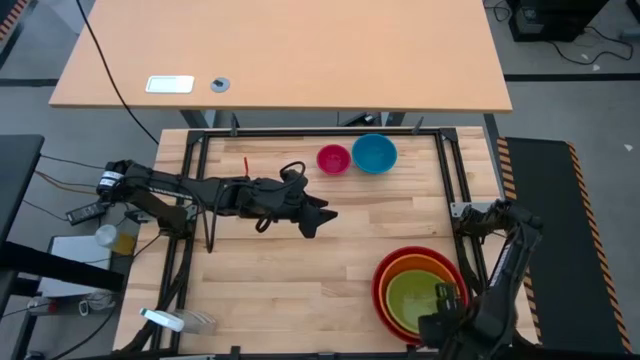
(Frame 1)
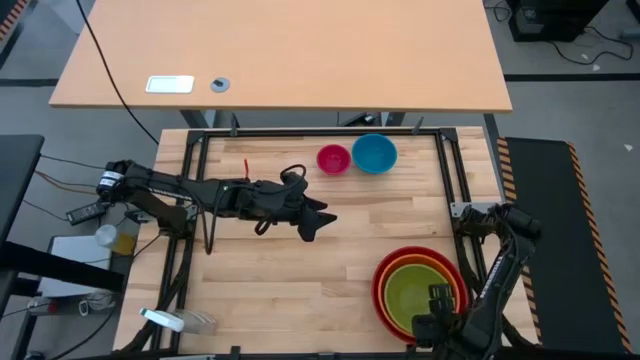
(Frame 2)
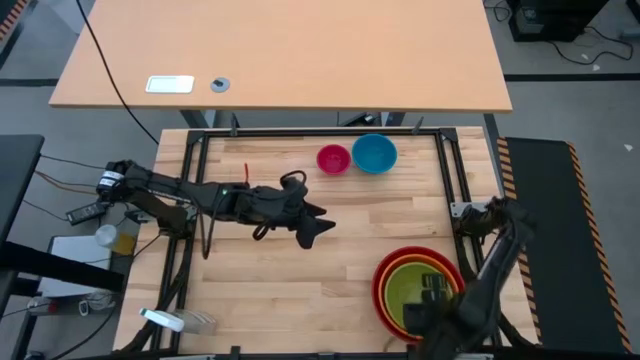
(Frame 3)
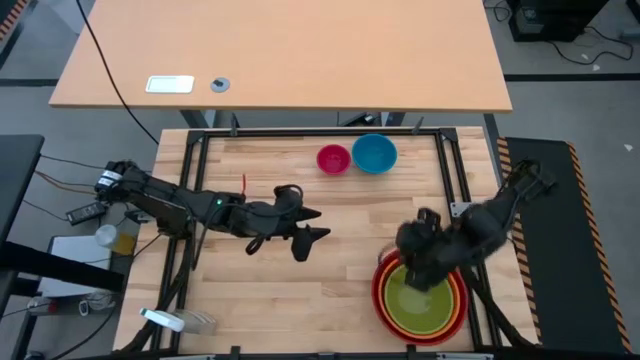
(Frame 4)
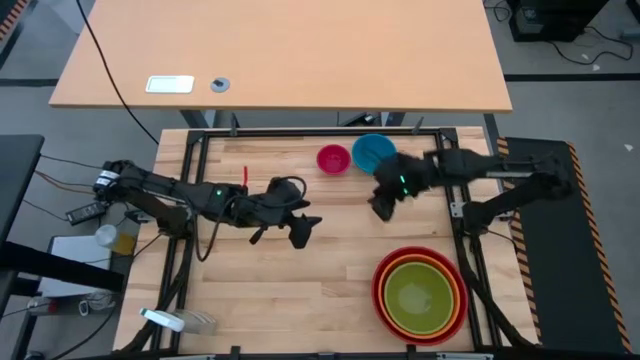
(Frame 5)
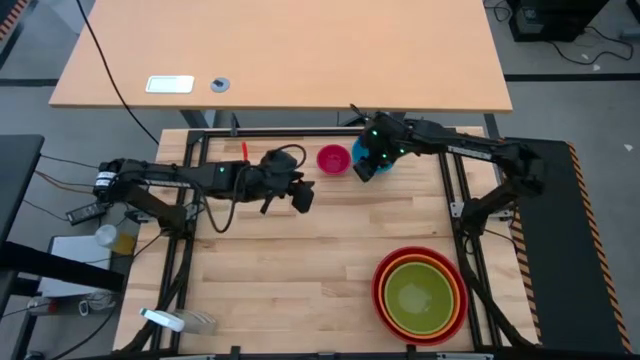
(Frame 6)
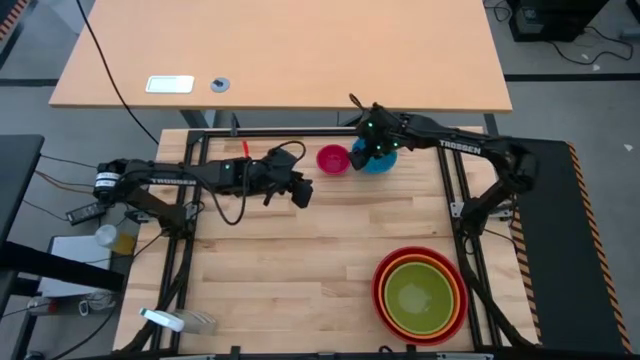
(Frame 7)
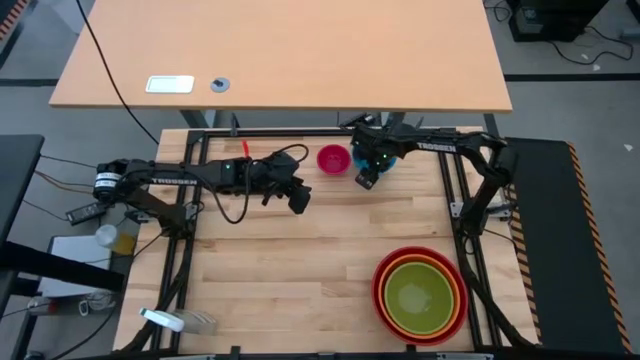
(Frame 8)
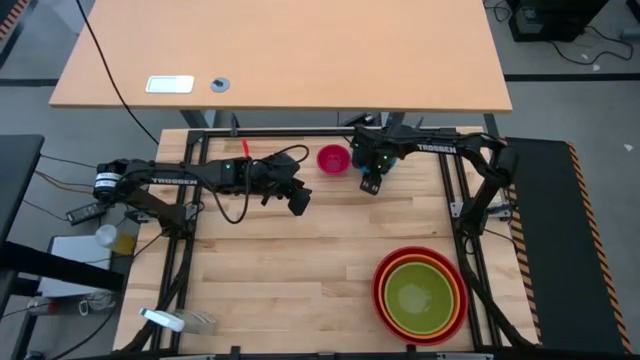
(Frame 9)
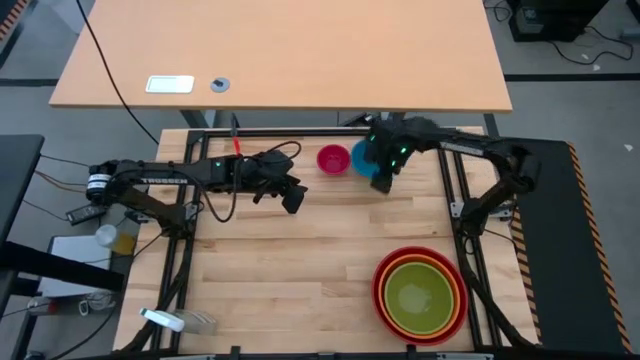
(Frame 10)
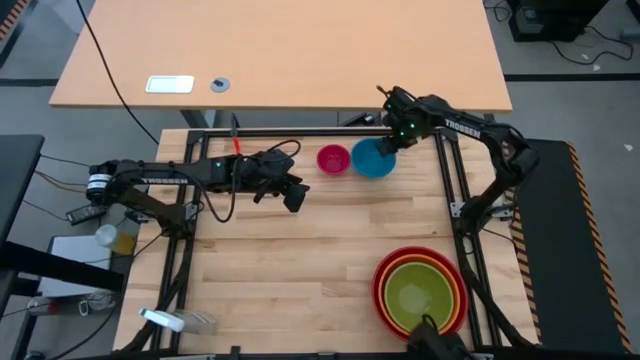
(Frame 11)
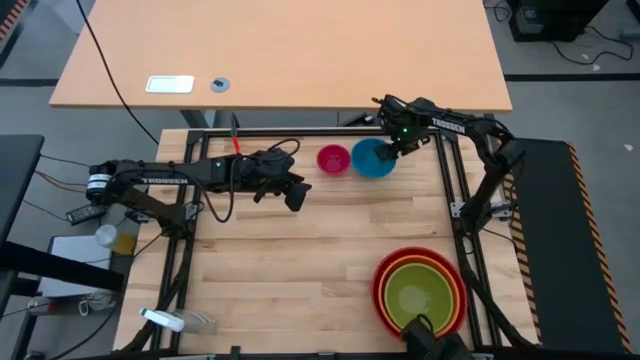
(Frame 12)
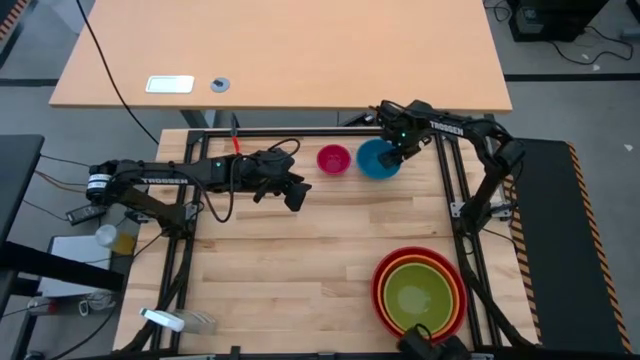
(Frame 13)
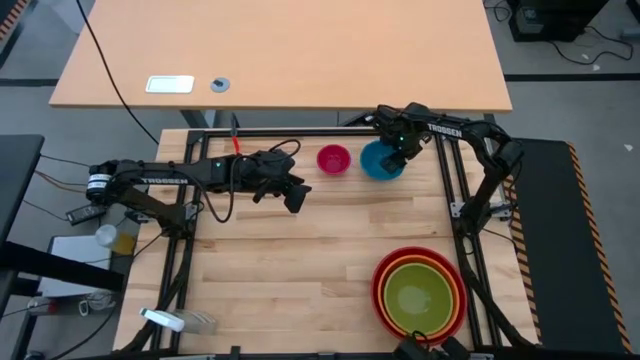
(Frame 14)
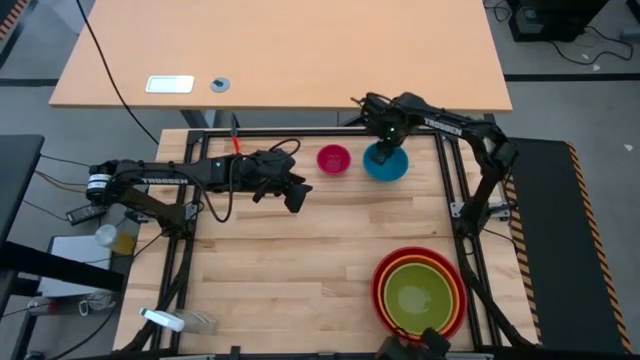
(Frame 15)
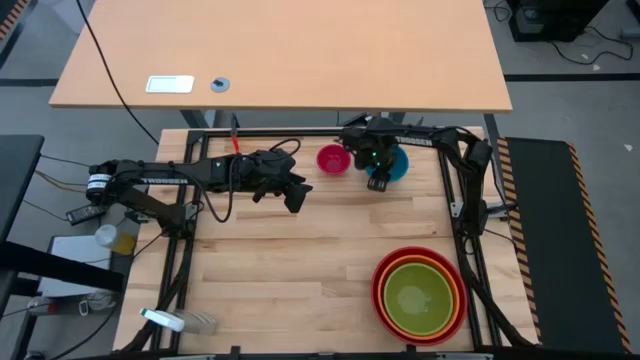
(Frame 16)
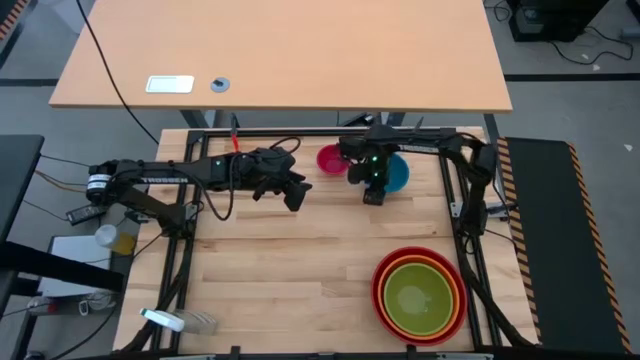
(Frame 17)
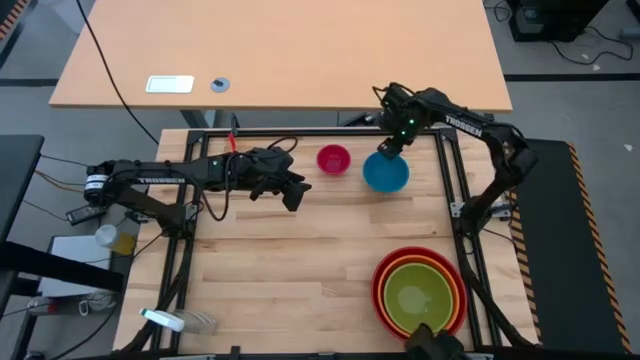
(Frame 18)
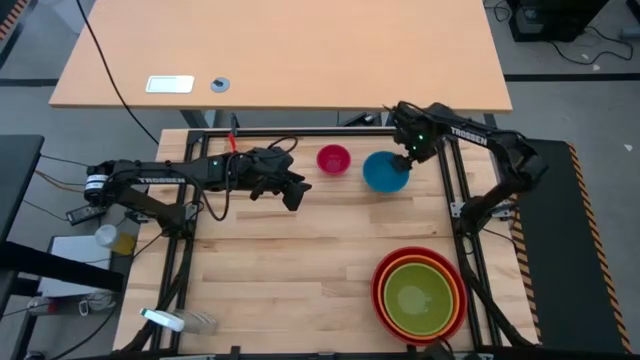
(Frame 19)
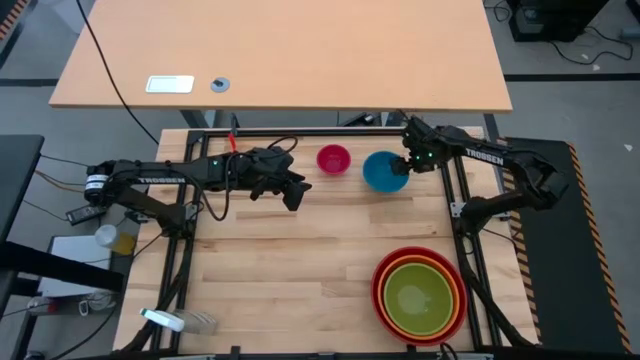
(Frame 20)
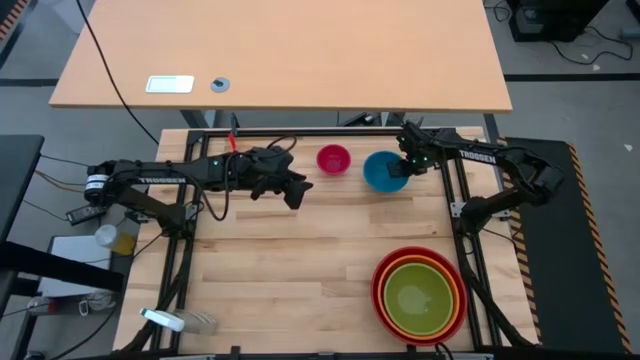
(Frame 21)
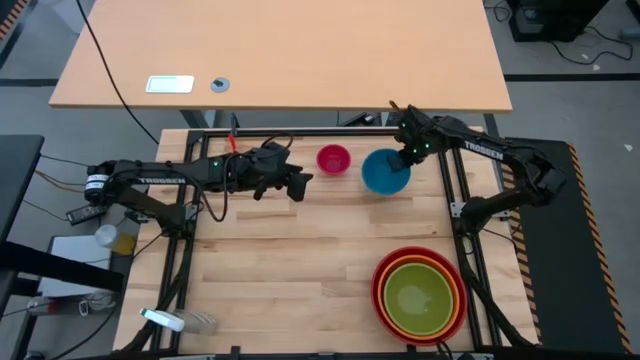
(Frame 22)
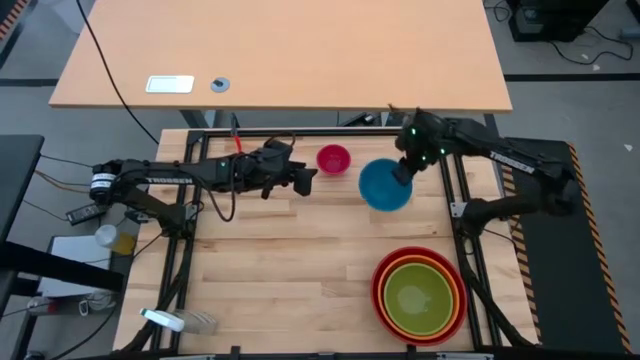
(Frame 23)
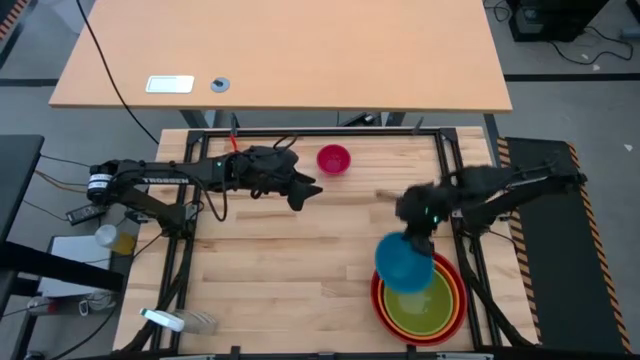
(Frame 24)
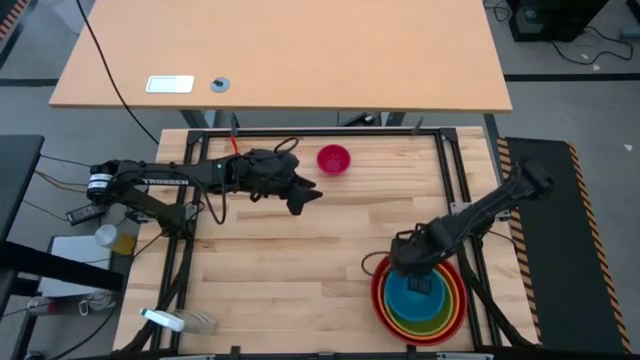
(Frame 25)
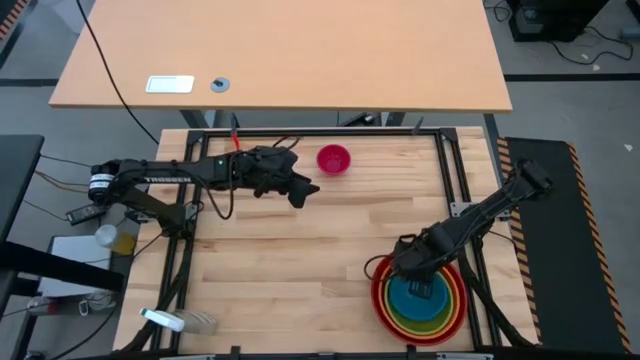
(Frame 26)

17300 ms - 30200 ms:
Stack the blue bowl on top of the green bowl

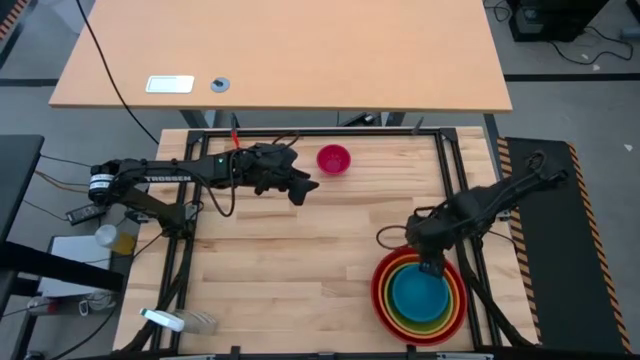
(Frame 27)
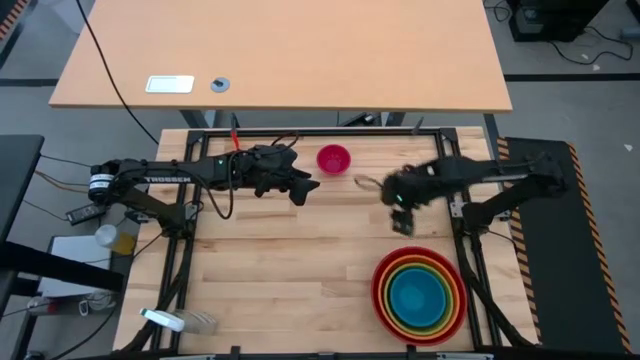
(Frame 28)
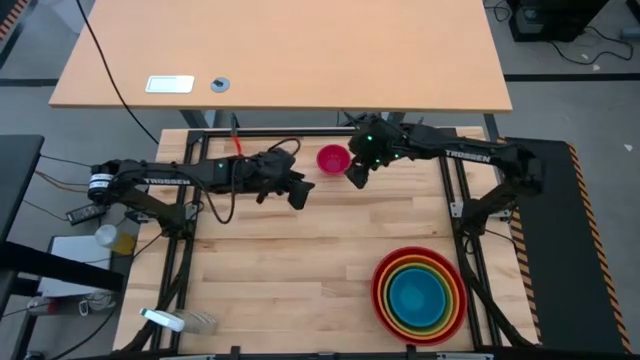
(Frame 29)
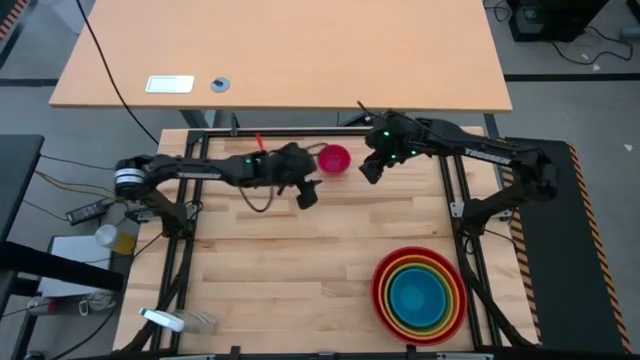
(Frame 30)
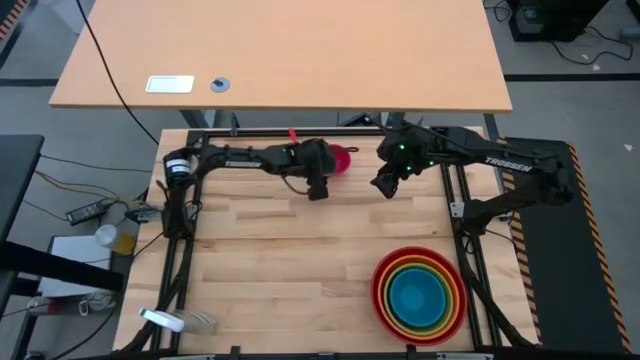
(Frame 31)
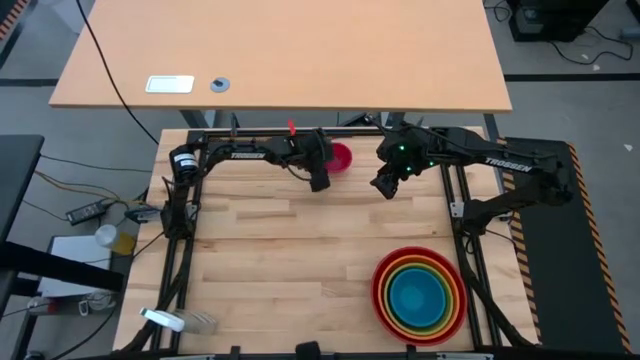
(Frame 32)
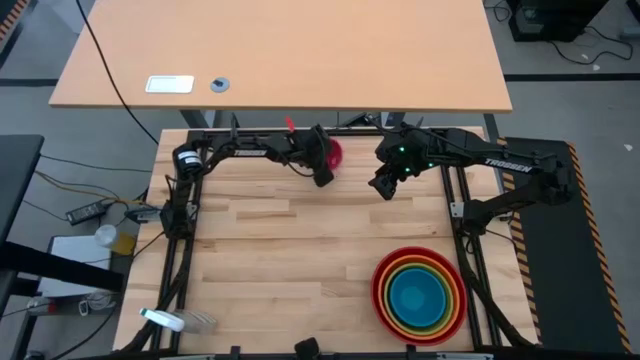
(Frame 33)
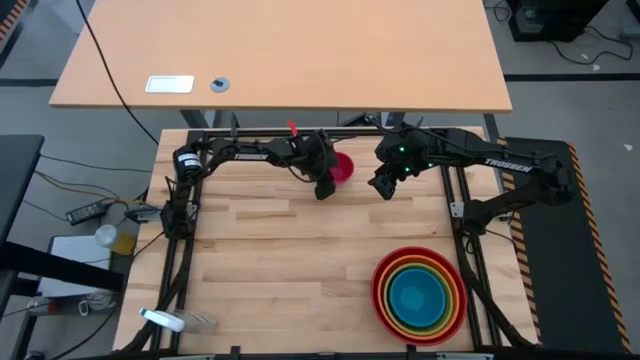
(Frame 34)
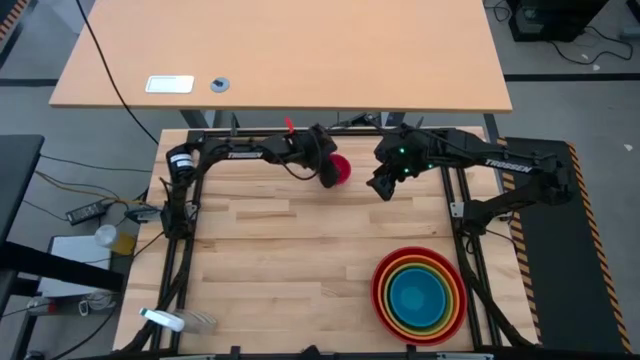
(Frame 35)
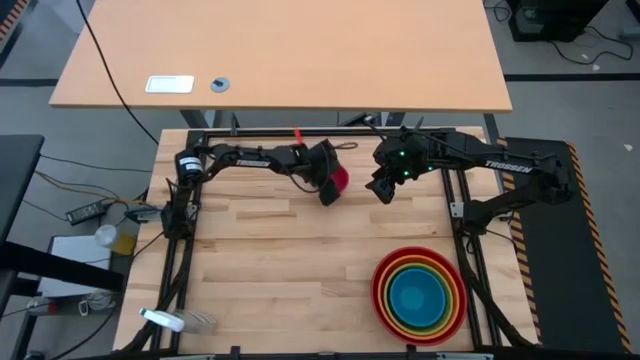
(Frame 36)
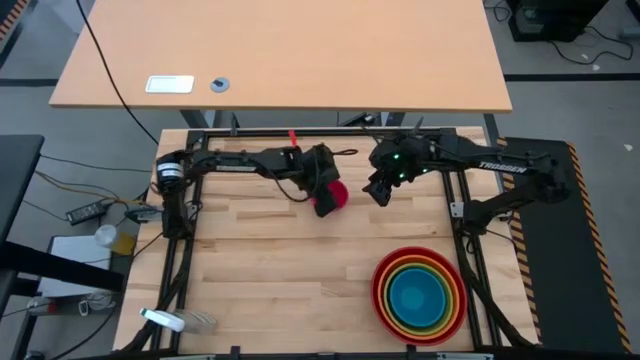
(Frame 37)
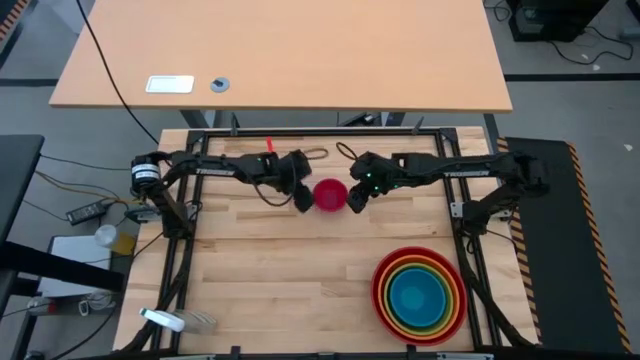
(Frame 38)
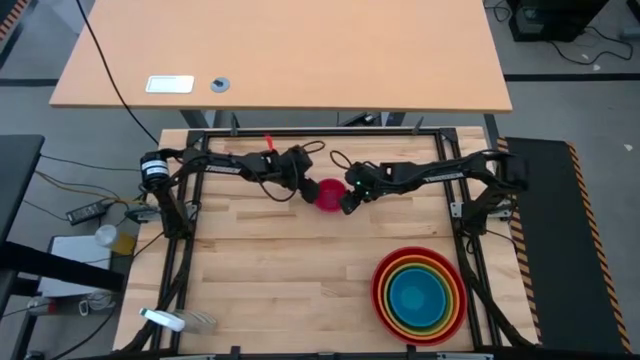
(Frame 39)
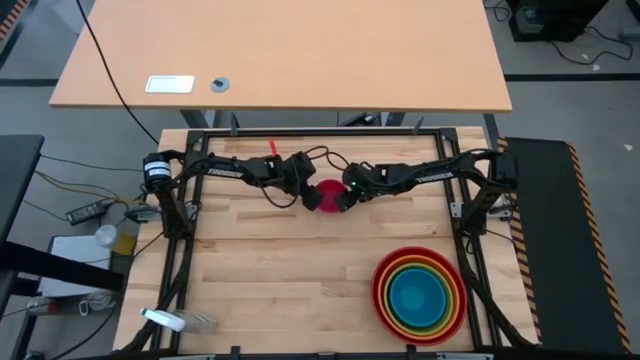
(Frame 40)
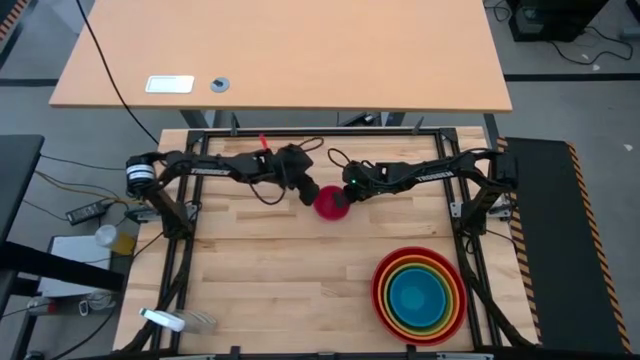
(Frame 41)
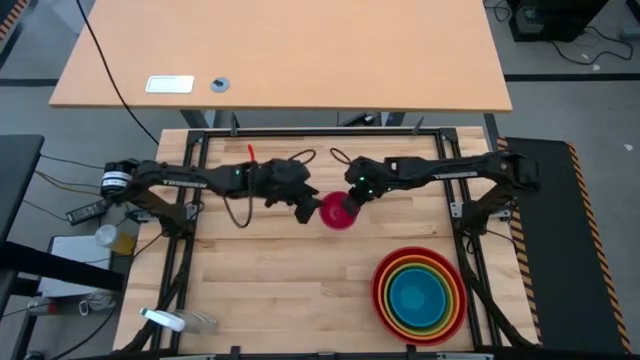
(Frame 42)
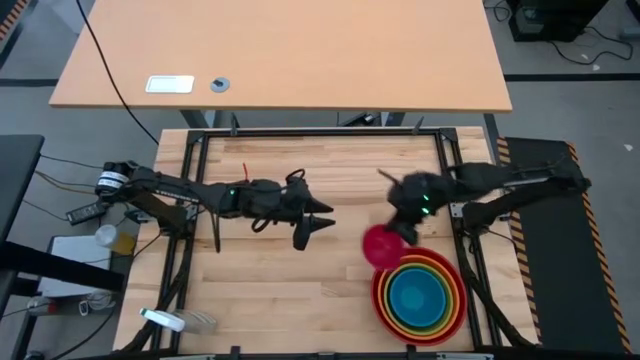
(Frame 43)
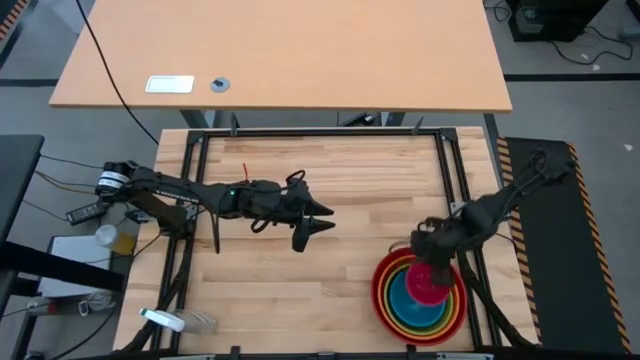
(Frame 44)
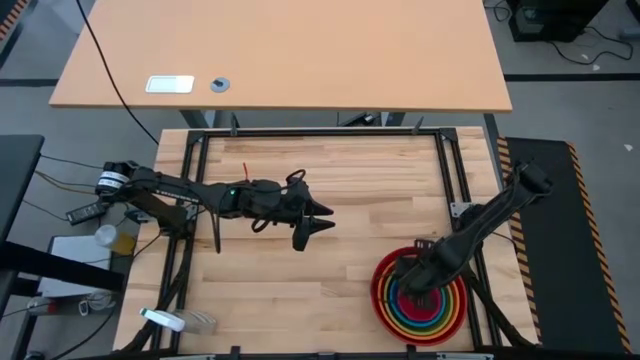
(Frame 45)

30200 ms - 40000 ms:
Stack the red bowl on top of the blue bowl
